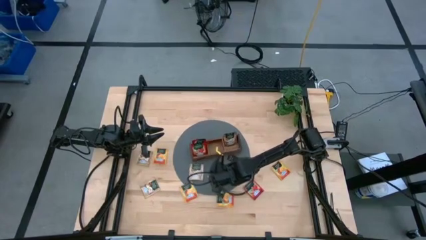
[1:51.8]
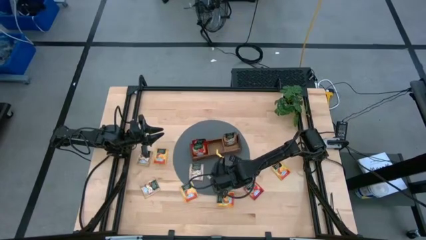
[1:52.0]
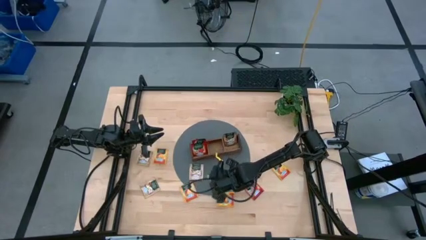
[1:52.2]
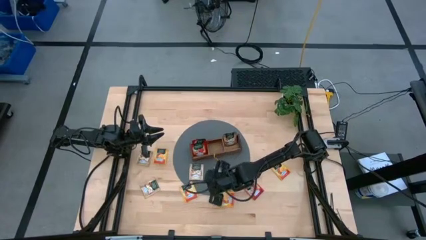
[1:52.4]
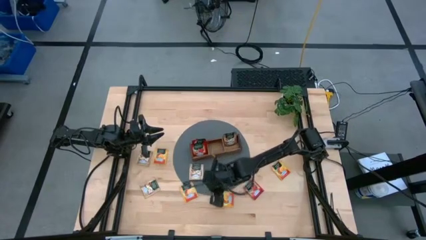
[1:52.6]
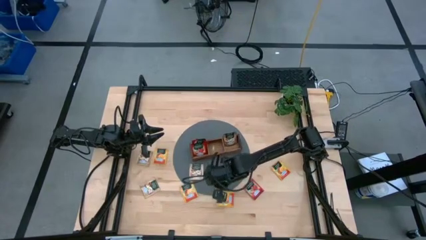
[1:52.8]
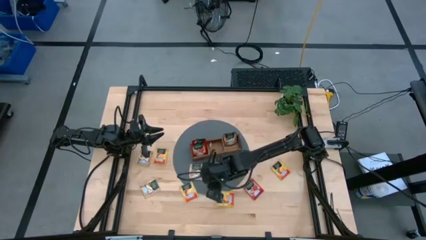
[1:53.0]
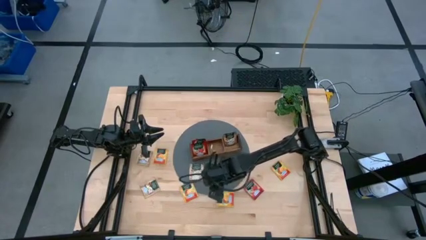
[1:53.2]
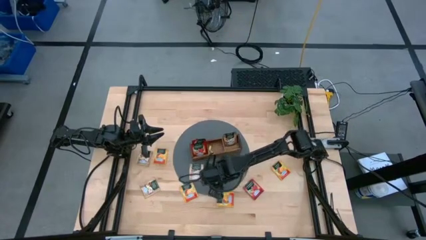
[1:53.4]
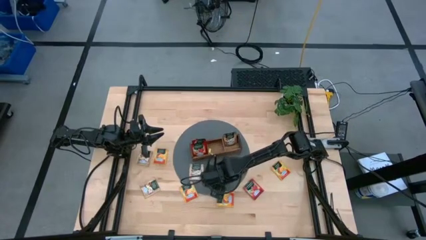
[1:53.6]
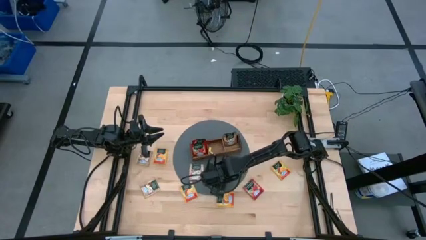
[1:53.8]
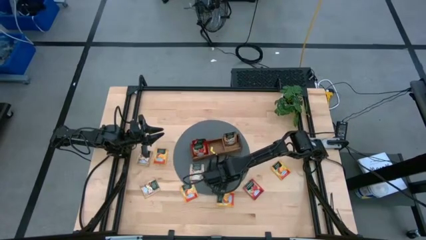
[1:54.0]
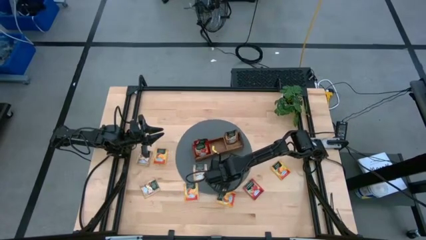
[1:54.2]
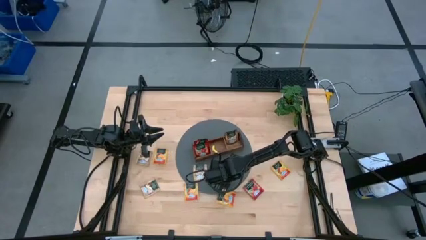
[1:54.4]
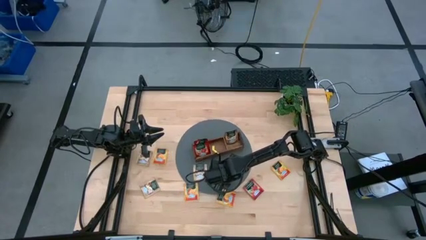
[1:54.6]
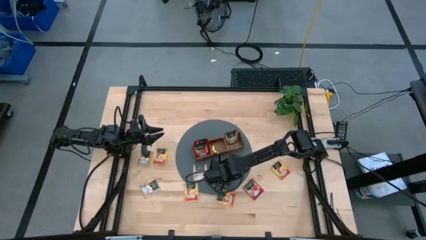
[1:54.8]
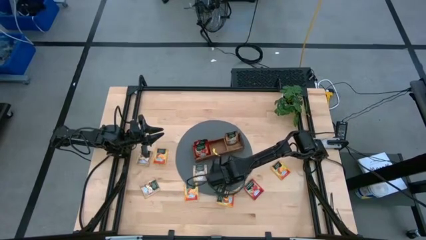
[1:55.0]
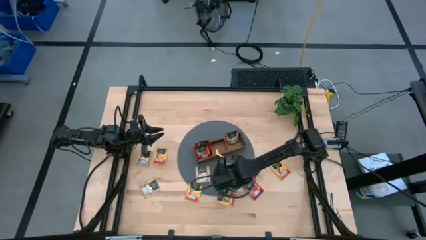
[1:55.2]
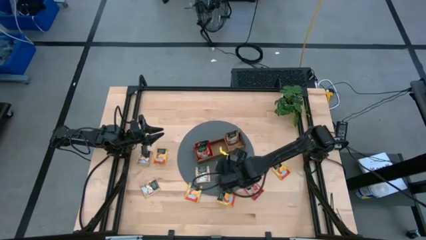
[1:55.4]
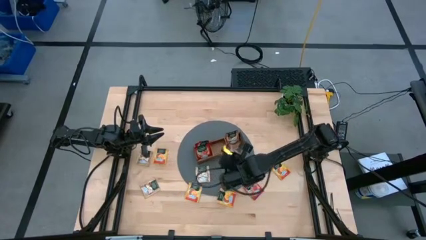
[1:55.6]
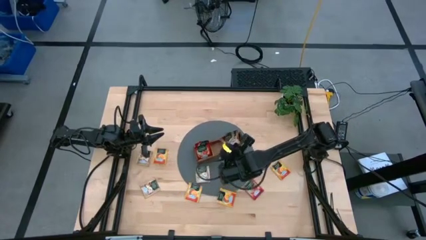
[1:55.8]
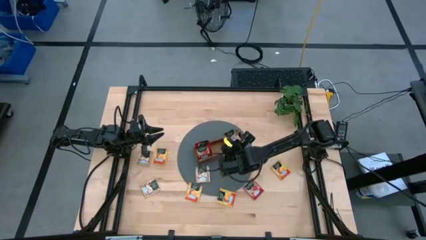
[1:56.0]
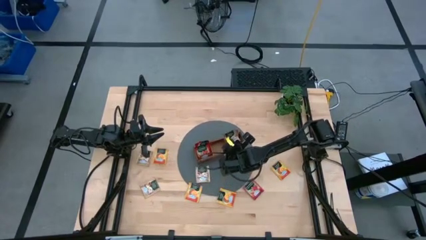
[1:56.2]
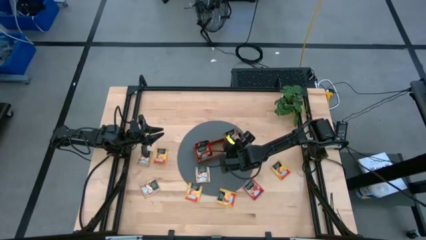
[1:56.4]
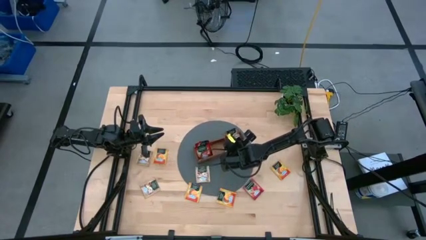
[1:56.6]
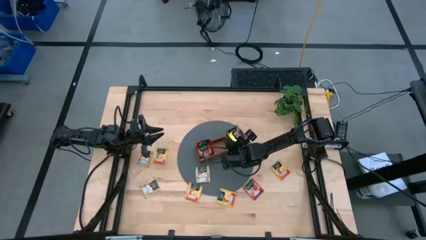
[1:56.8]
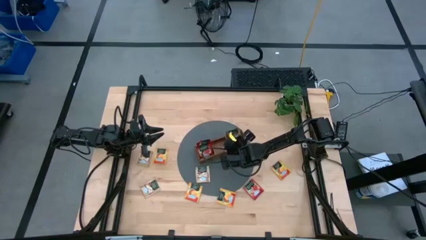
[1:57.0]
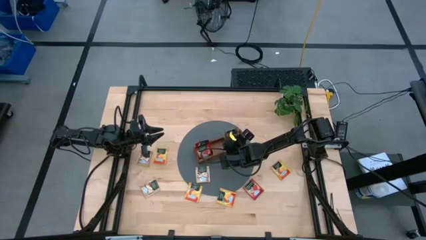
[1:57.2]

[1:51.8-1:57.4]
Task: Pick & Place Tea
Put the yellow tea bag into the right section of the wooden organizer

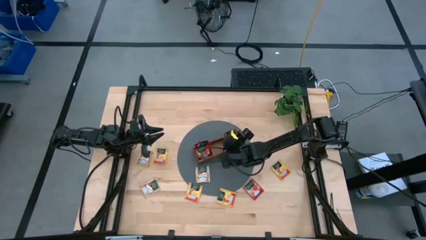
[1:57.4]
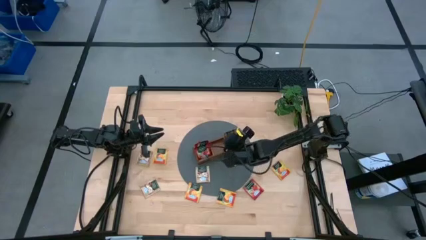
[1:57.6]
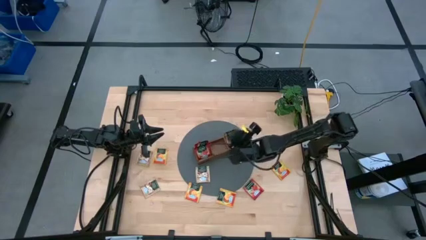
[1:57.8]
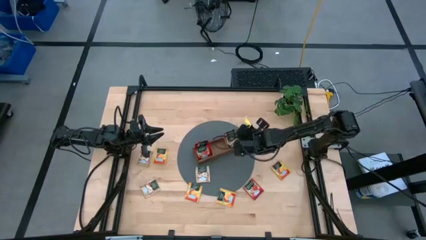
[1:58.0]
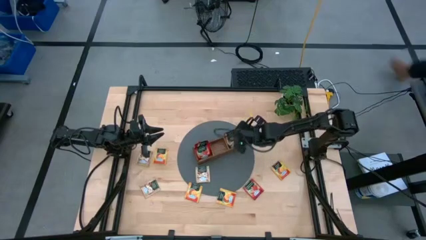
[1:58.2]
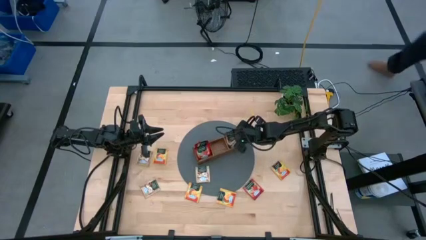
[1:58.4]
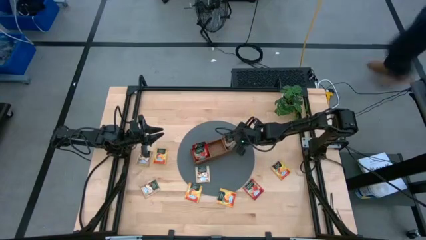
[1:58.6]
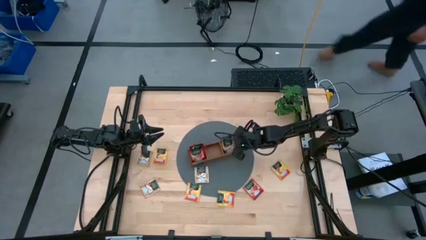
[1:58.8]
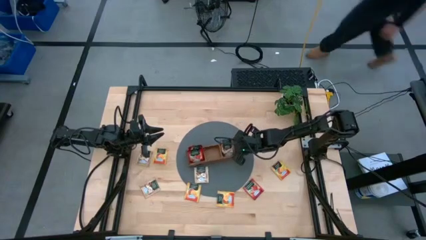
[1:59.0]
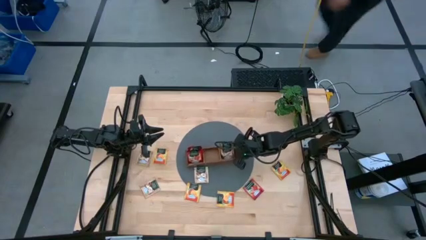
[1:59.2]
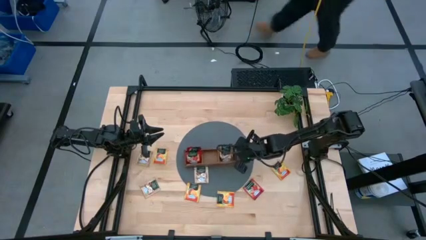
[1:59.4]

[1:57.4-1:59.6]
Adjust the wooden organizer

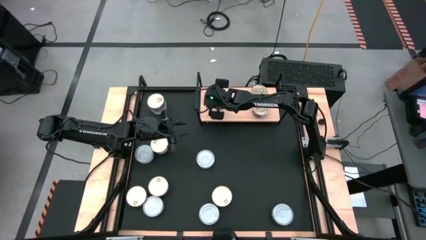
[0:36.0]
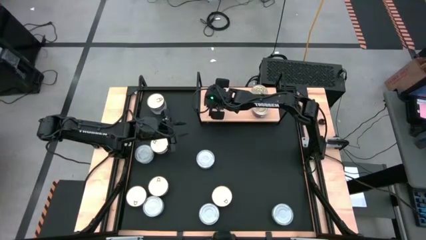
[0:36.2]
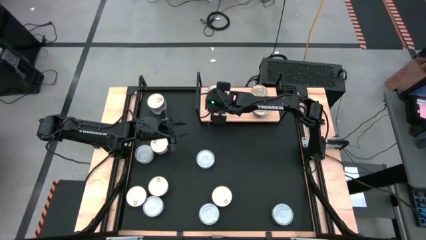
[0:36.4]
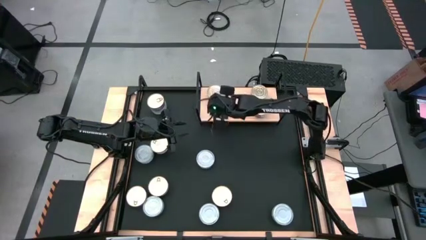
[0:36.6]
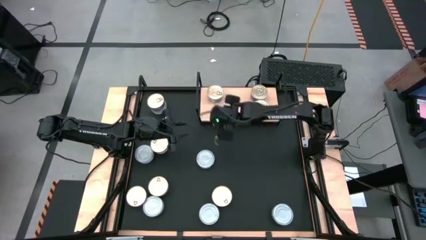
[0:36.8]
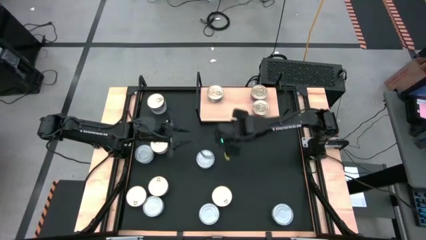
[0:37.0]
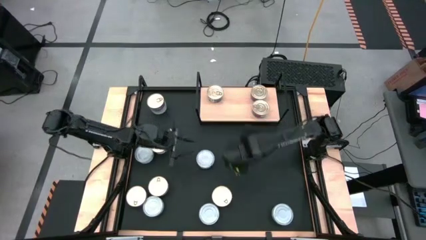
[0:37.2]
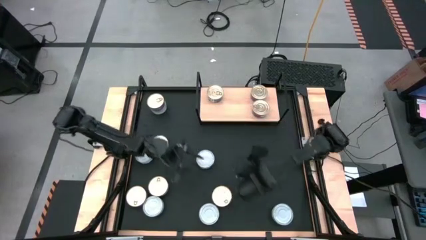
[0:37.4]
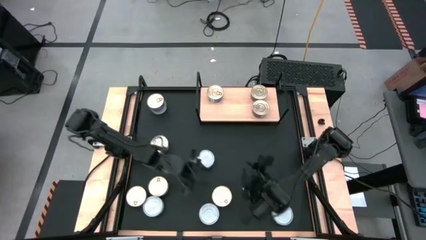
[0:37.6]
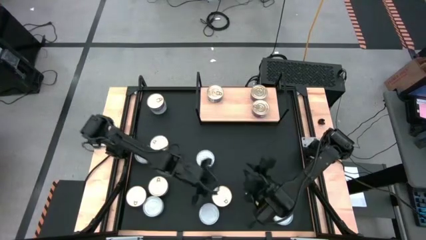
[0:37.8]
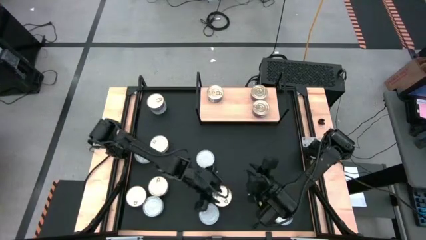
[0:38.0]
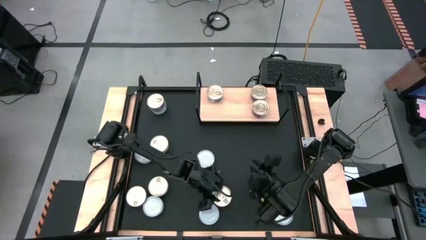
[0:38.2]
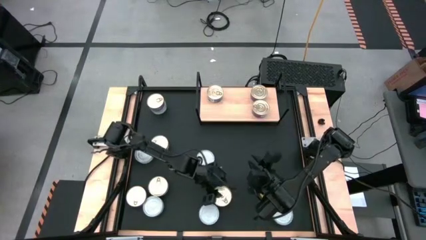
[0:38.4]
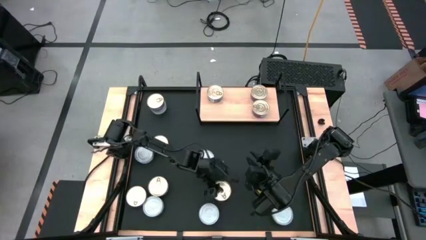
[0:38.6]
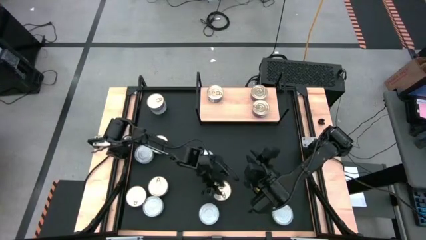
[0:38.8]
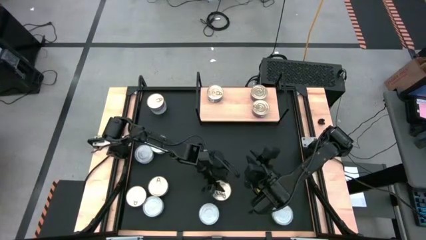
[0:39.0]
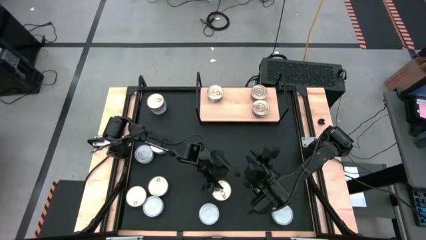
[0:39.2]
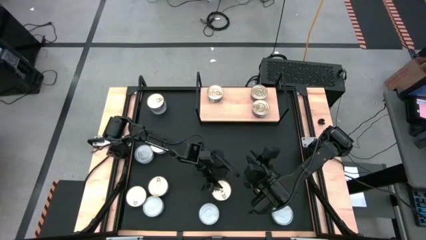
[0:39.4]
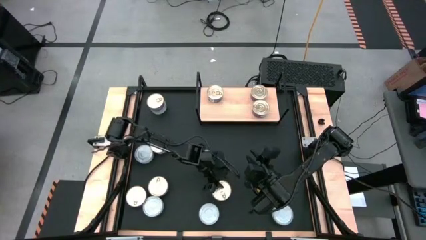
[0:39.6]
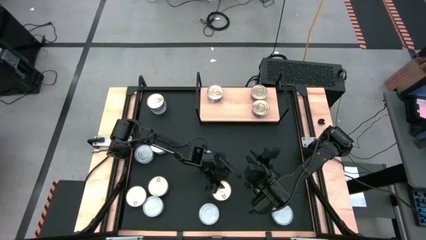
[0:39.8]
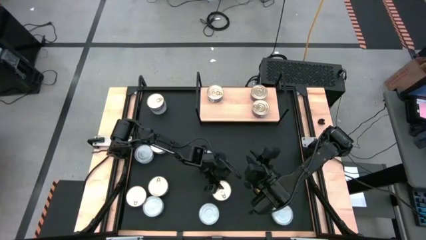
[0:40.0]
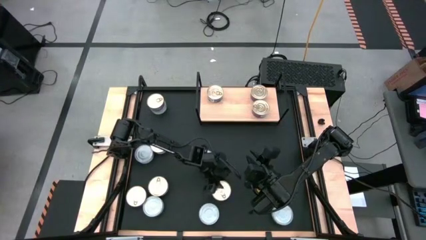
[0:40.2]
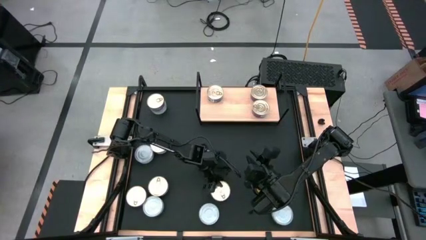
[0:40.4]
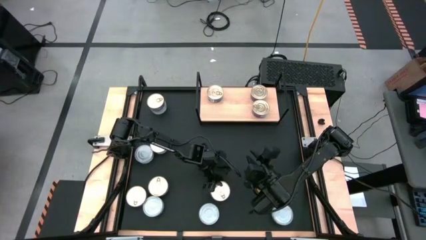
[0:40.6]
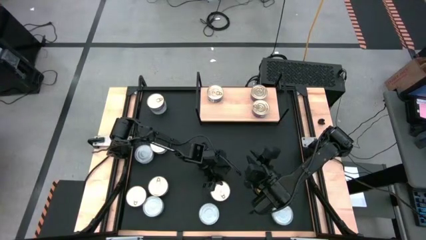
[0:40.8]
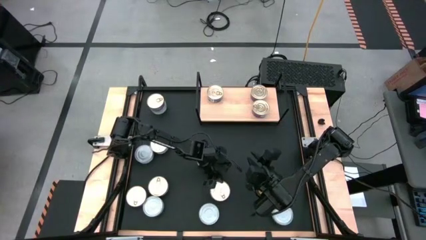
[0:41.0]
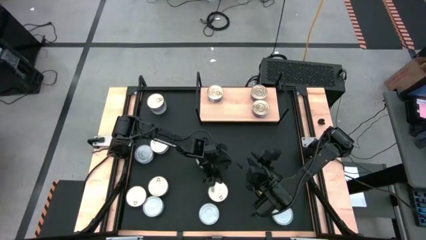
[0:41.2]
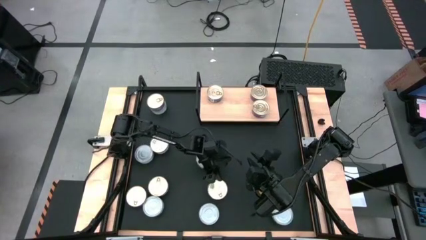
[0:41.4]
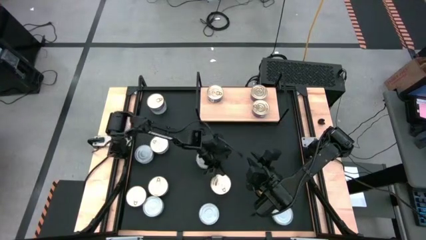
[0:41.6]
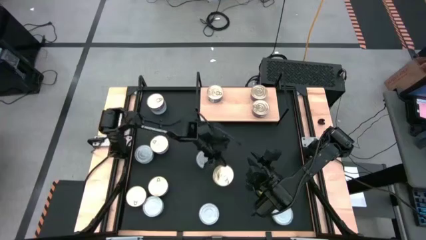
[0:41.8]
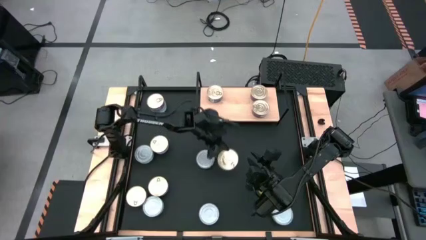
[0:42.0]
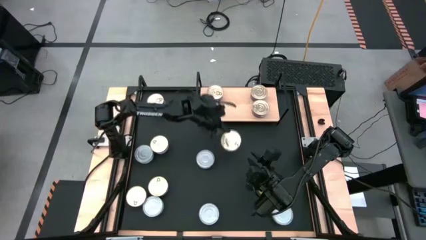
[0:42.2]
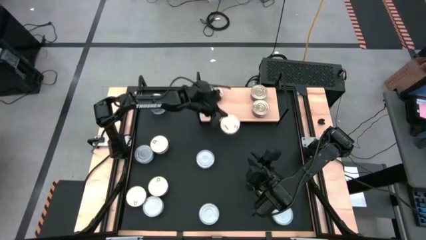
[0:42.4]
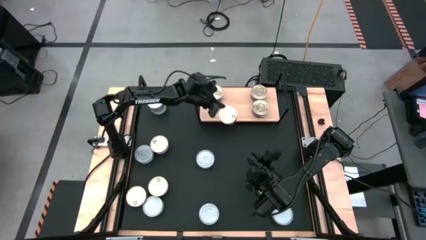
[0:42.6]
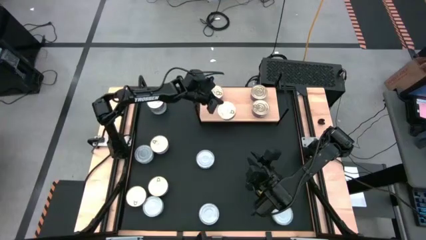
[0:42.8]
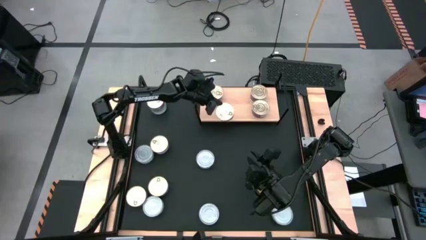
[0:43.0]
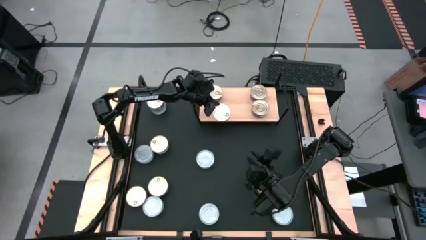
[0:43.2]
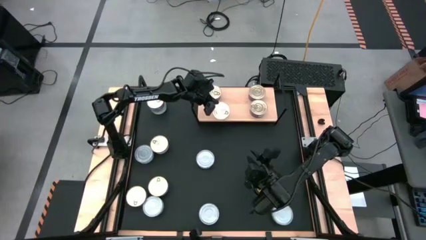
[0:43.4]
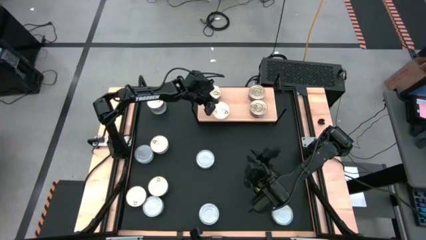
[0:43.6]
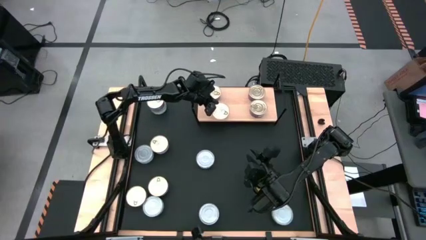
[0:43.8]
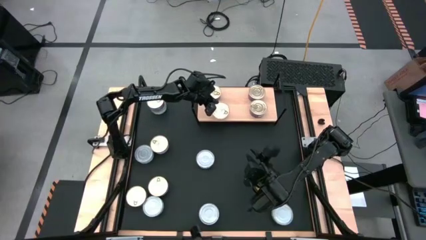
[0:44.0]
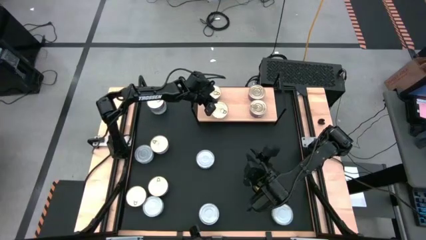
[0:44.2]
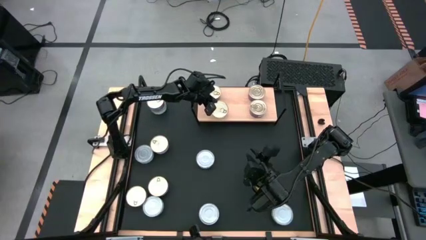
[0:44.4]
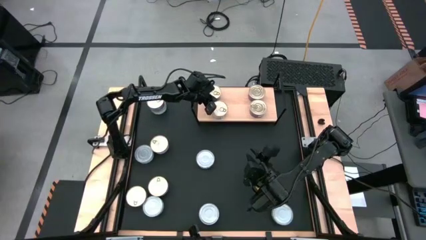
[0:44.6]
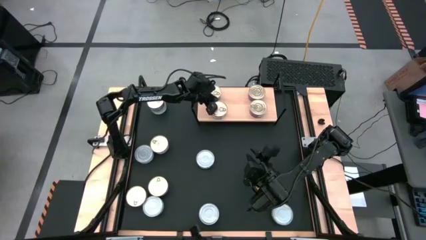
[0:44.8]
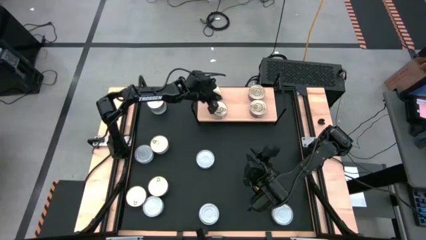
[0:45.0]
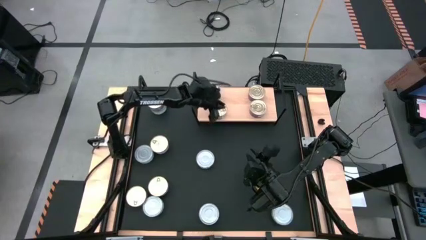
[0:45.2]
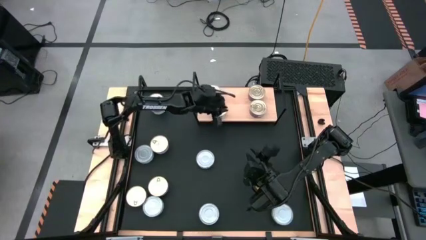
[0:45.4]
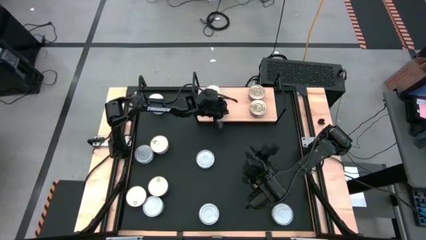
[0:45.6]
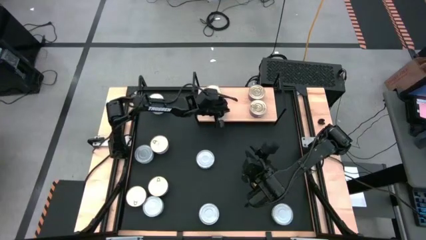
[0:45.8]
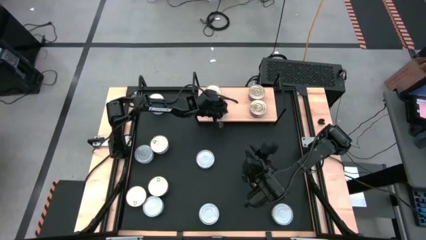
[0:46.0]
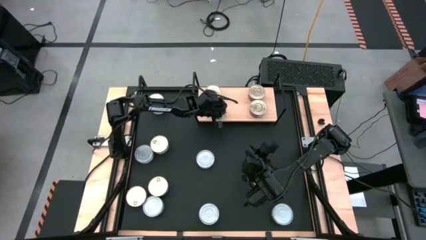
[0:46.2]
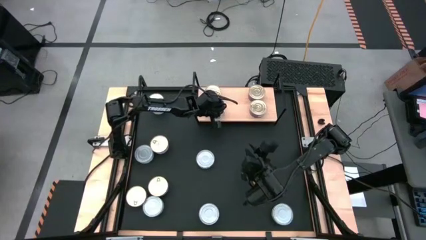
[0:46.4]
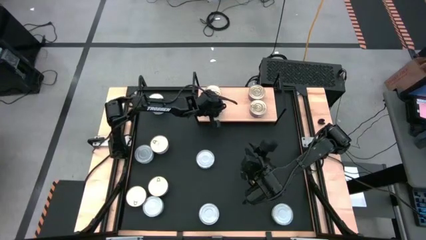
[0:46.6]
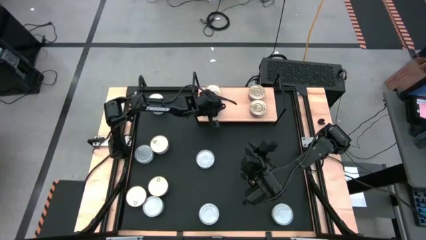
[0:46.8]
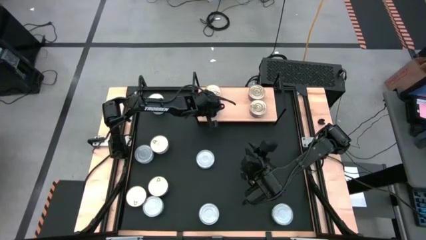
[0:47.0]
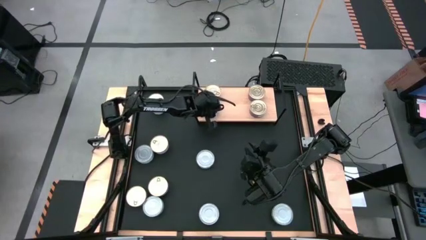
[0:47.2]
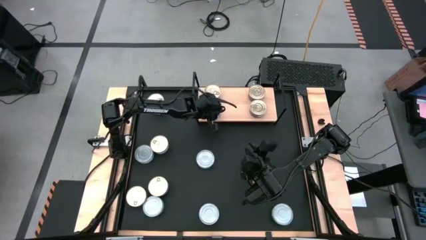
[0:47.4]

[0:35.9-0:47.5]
Task: Stack canned seafood by type on shelf
Put the blue pink tuna can on the shelf
